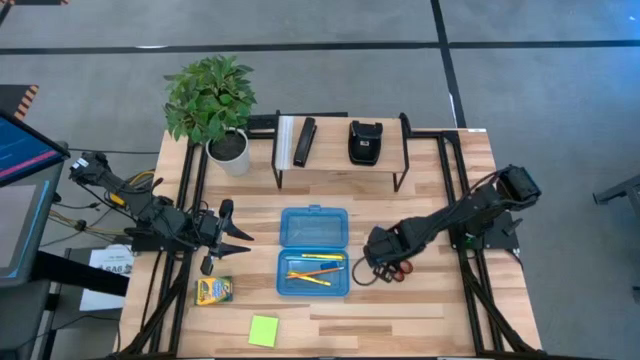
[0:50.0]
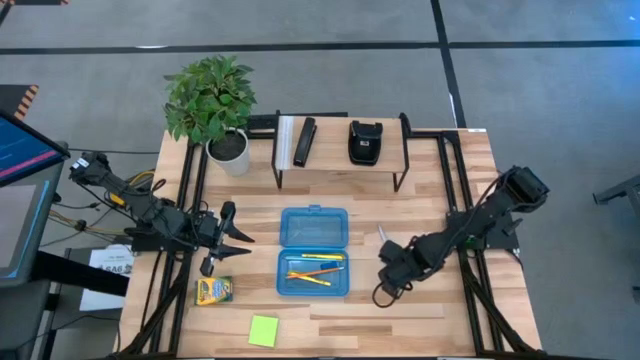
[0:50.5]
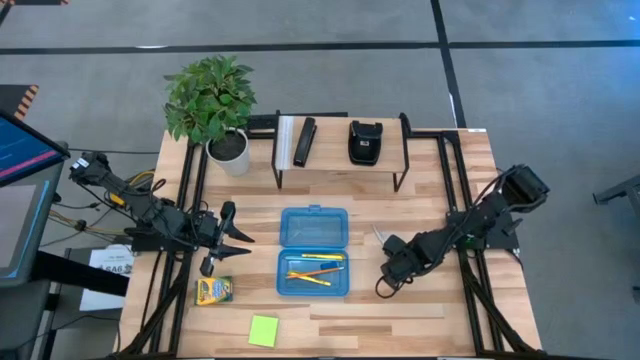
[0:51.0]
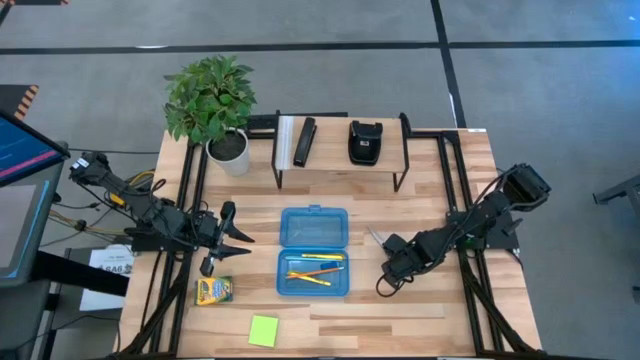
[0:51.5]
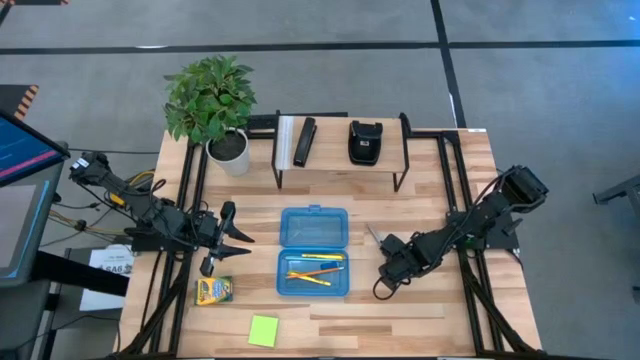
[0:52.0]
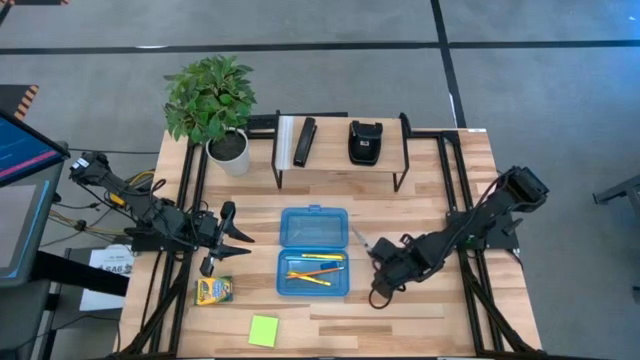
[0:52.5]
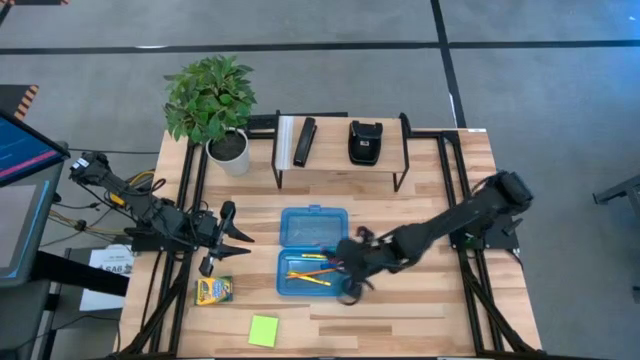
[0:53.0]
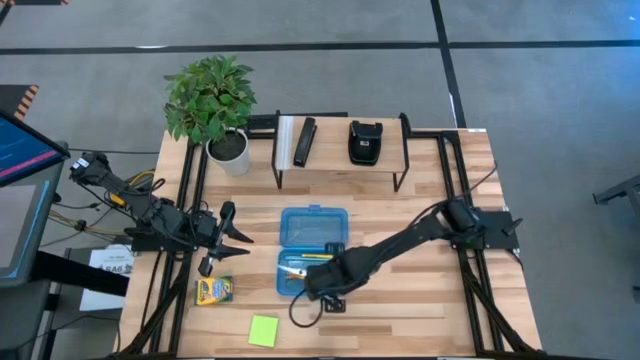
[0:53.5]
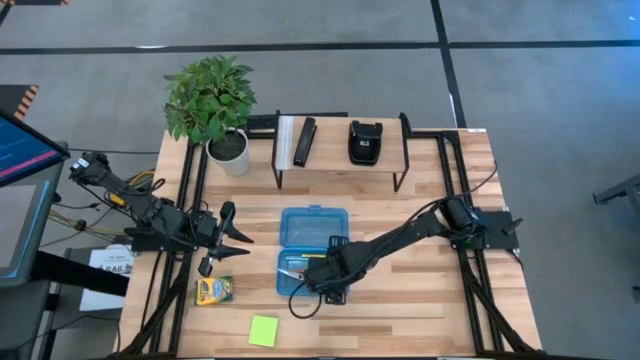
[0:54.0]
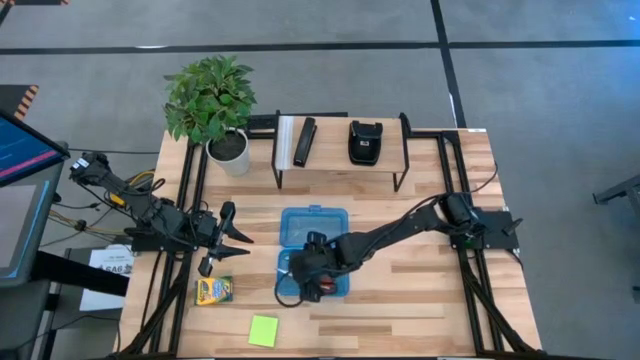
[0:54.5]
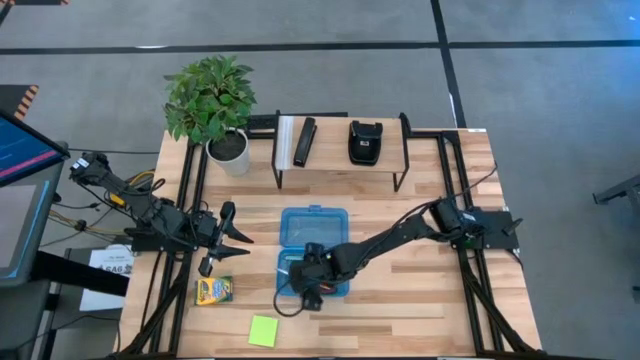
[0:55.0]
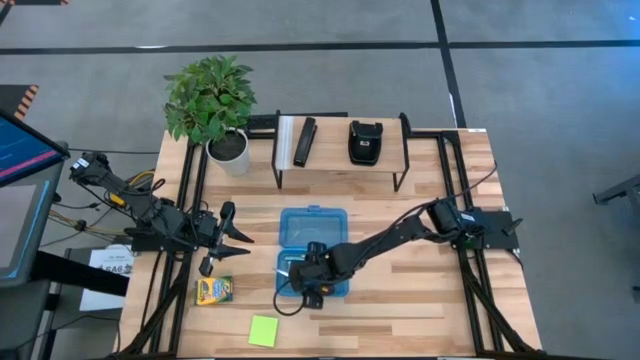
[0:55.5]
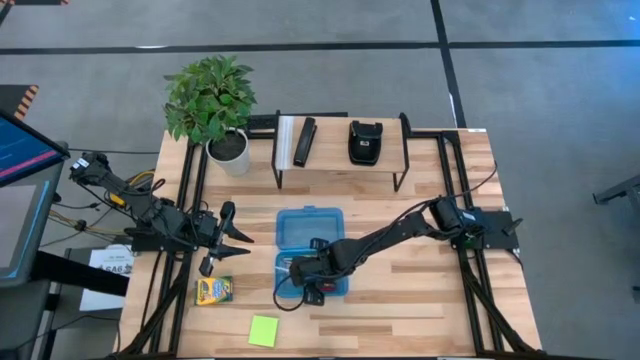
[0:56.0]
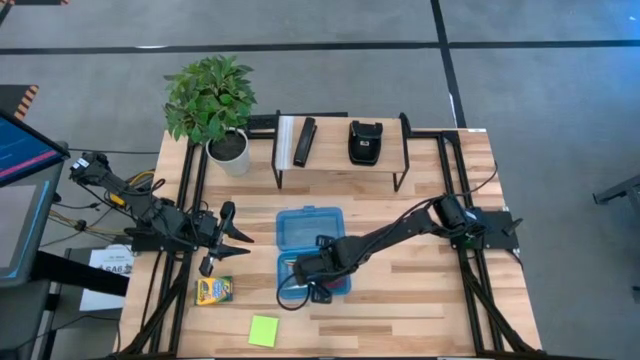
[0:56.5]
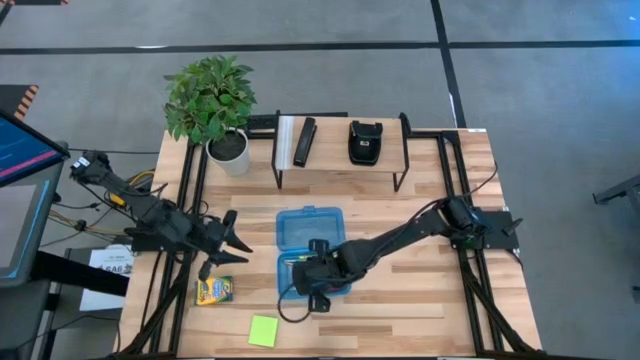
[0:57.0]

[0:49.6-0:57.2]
Task: Pack school essentials
Put the scissor into the blue pencil box

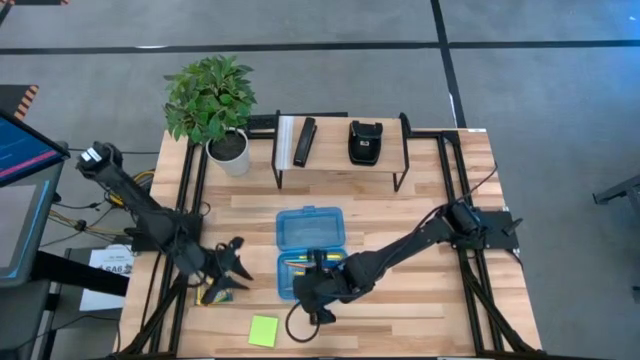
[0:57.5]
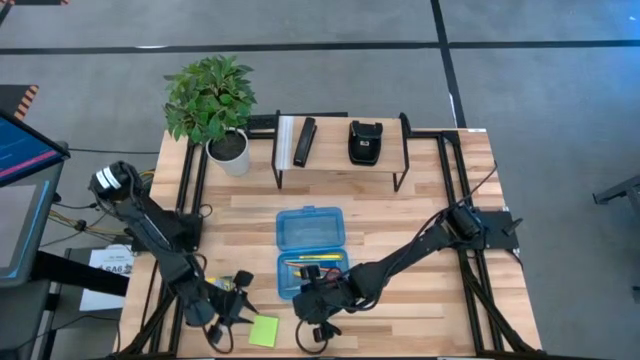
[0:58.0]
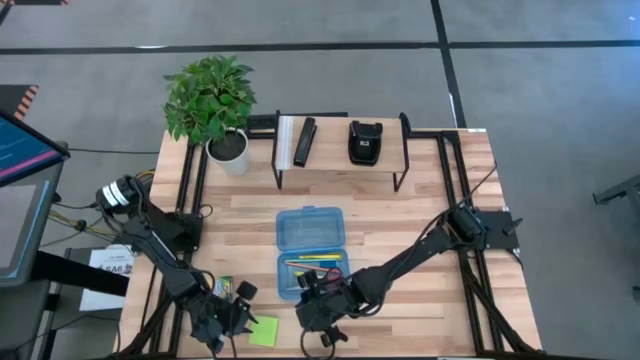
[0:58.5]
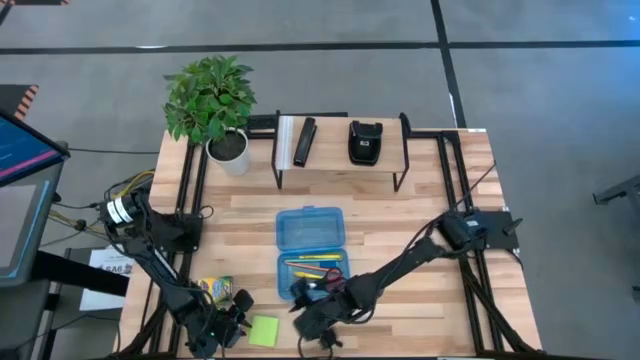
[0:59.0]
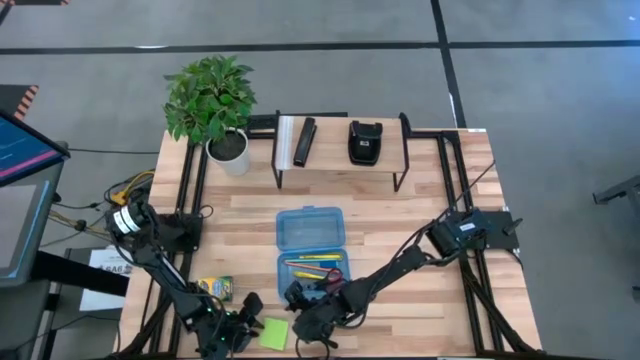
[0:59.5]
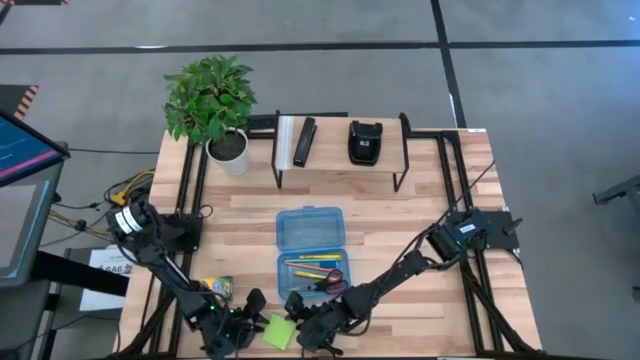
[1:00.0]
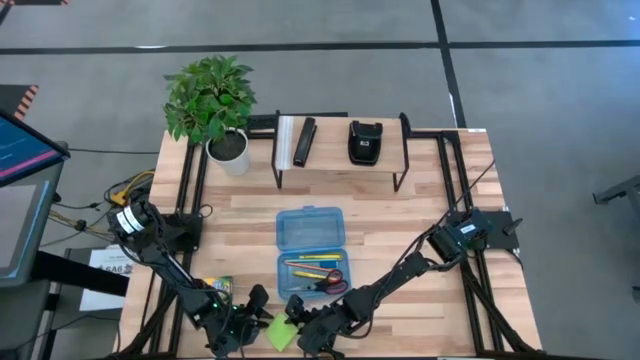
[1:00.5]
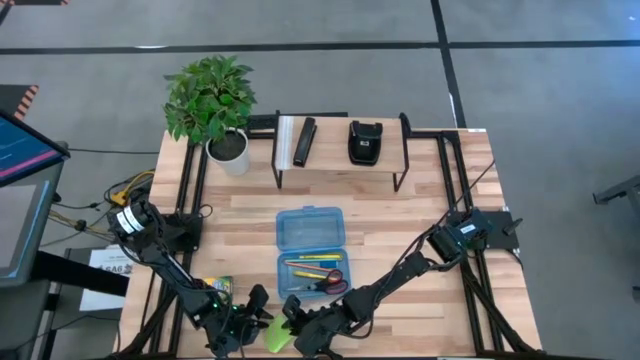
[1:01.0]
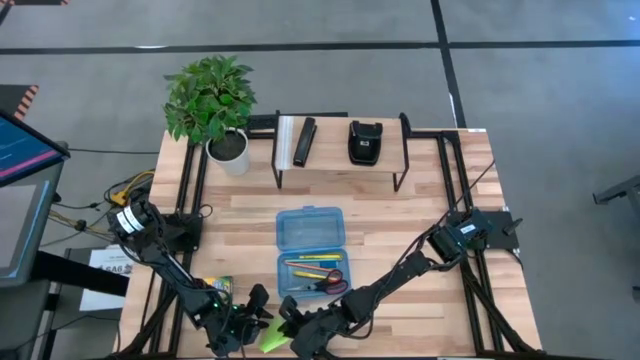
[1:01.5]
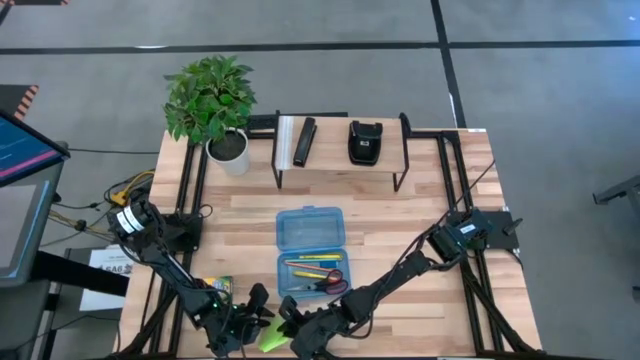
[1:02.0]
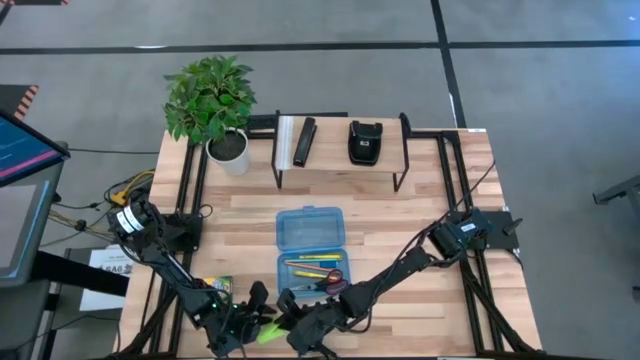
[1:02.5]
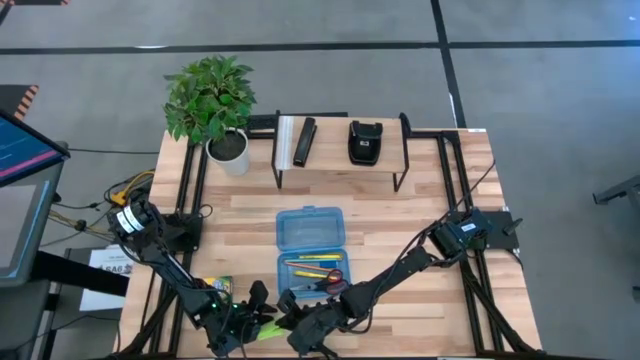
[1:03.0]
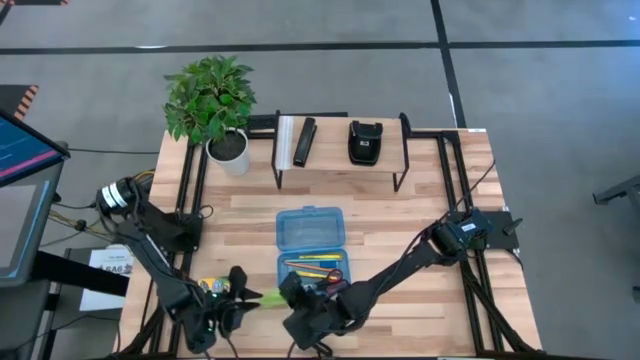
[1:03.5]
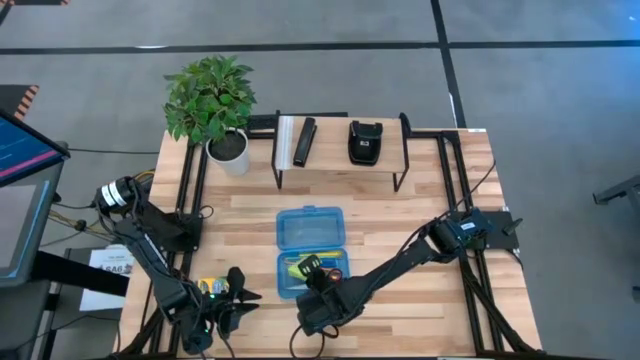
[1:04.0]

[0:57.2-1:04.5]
Put the sticky notes into the blue pencil box

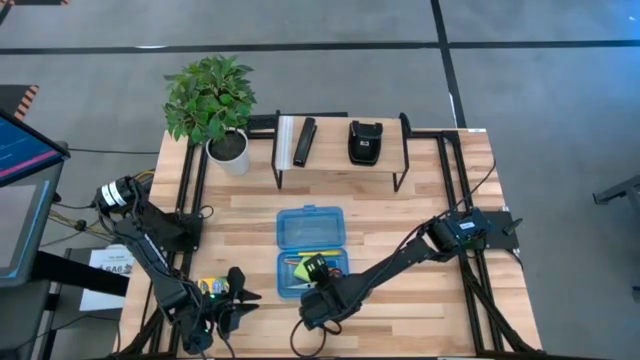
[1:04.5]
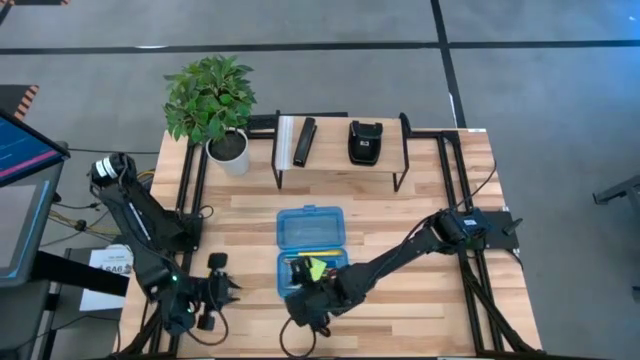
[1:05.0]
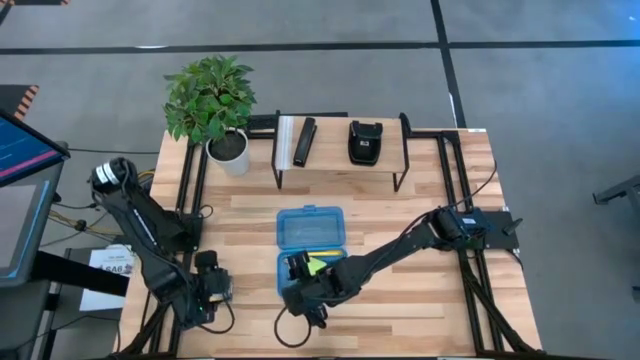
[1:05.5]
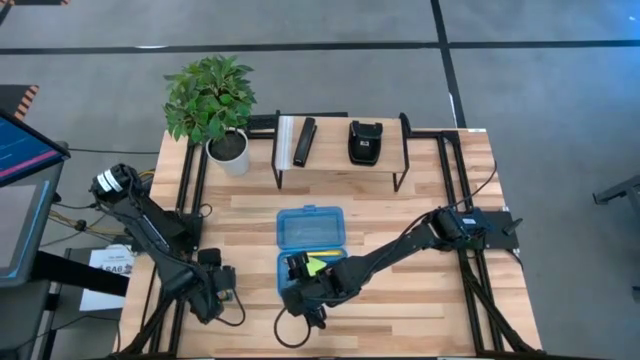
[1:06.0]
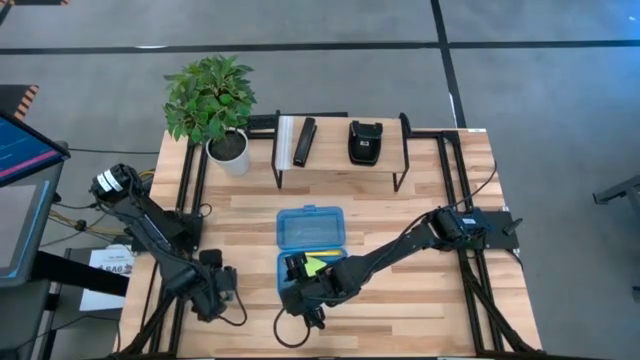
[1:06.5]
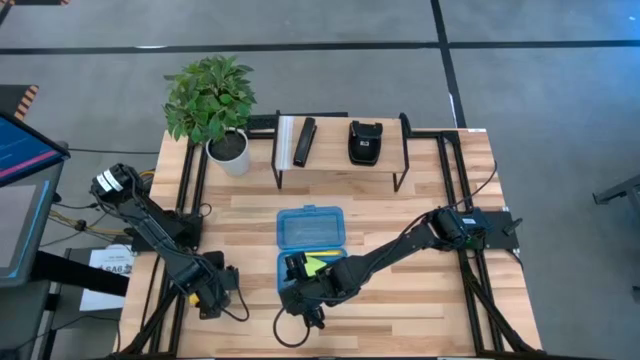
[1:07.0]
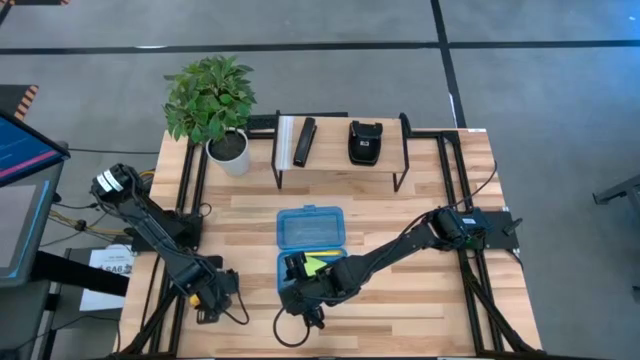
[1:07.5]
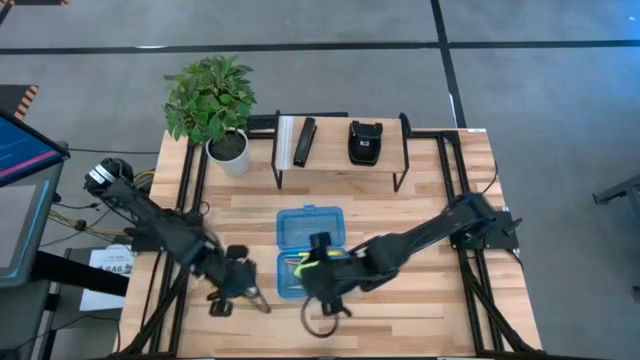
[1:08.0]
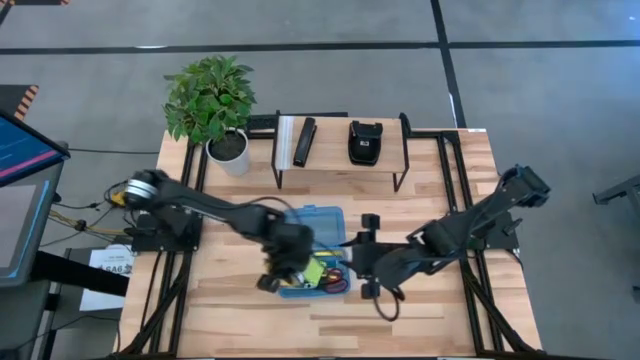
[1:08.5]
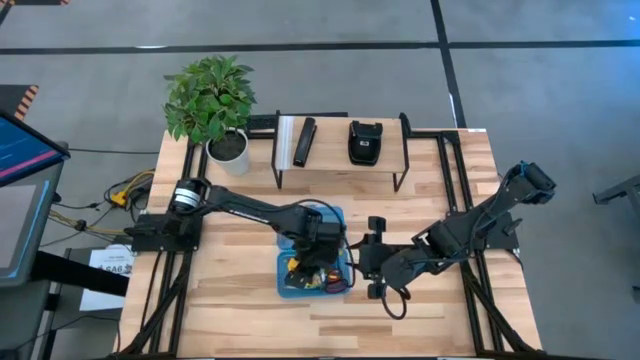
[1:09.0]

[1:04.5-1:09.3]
Put the crayon box into the blue pencil box

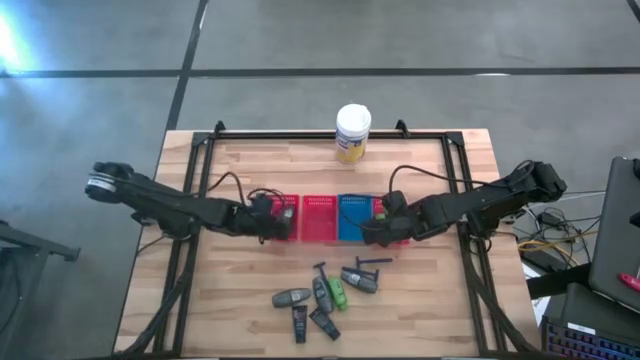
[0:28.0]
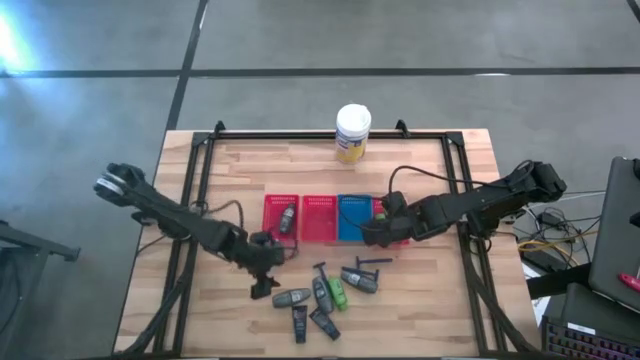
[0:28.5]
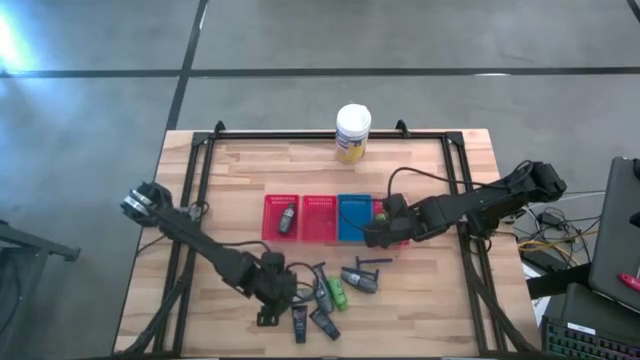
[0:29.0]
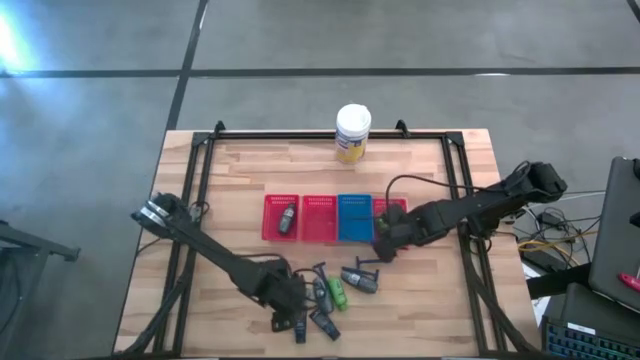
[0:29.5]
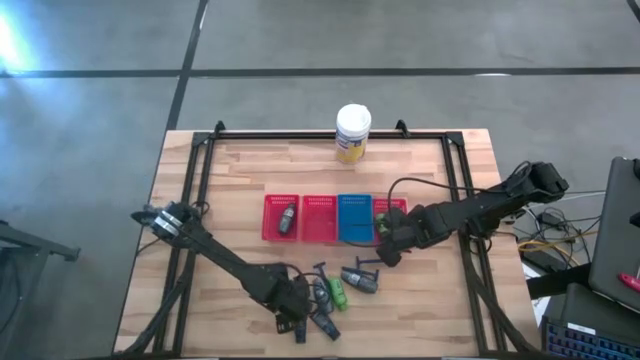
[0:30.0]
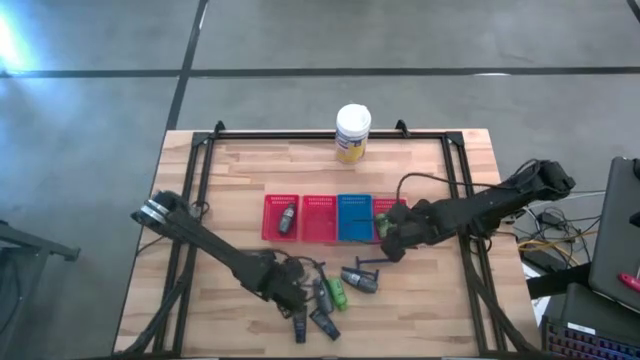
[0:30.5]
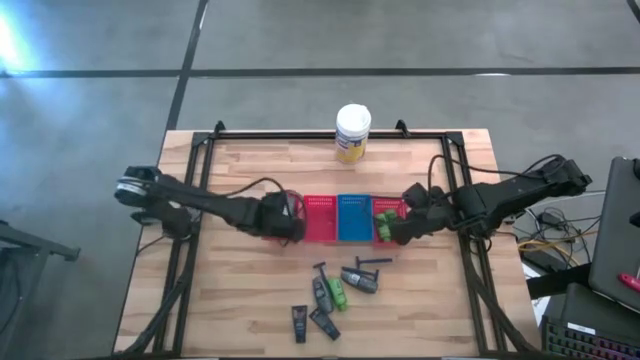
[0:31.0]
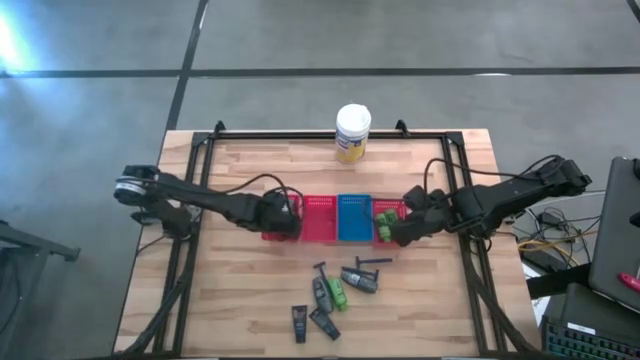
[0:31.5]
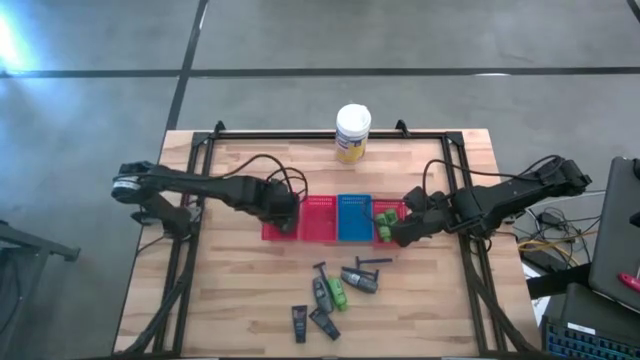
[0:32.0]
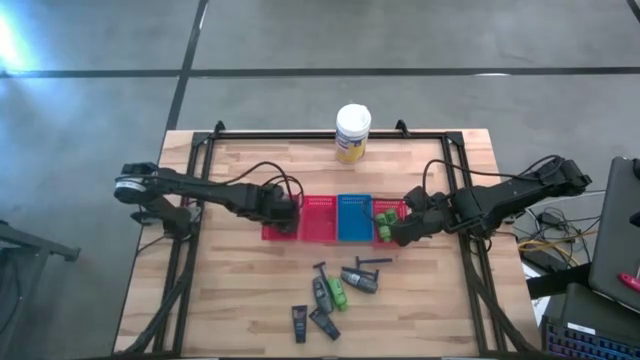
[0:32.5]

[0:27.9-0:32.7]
Task: Pick & Place Travel size toiletries
Put the gray deodorant into the left red bin
